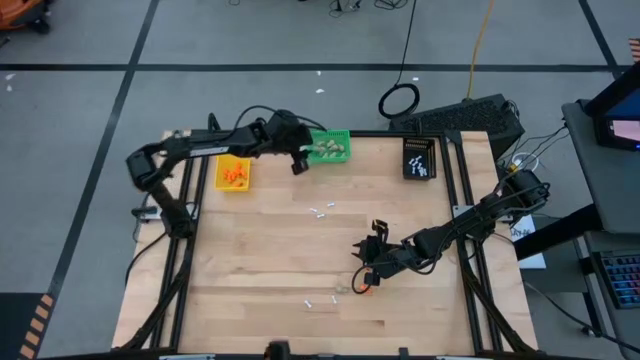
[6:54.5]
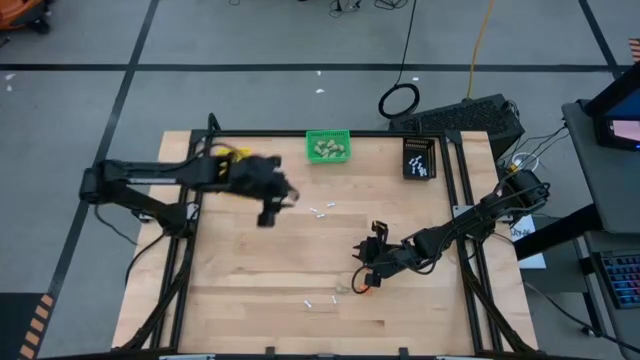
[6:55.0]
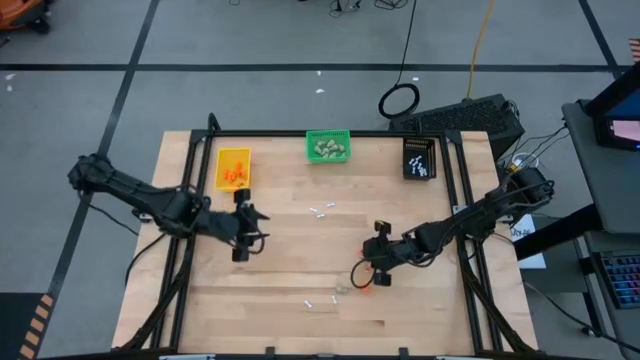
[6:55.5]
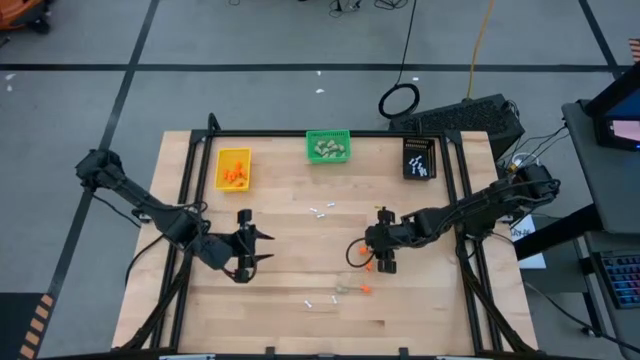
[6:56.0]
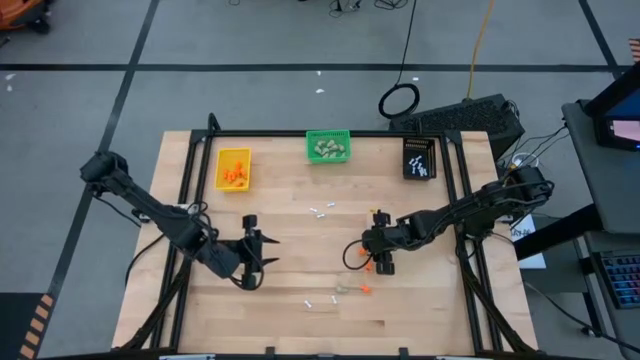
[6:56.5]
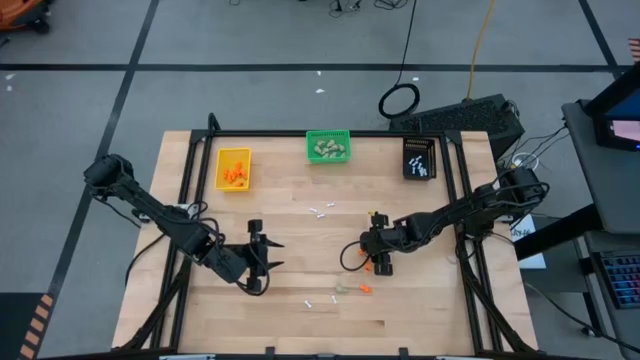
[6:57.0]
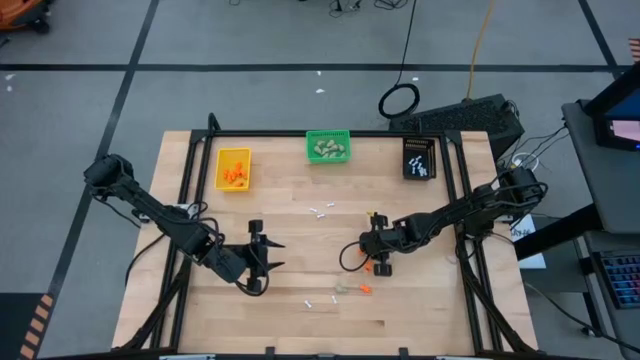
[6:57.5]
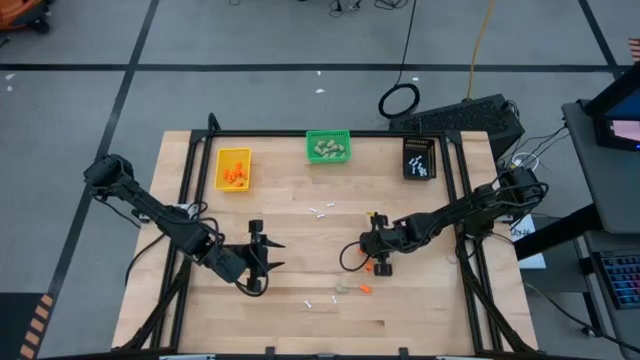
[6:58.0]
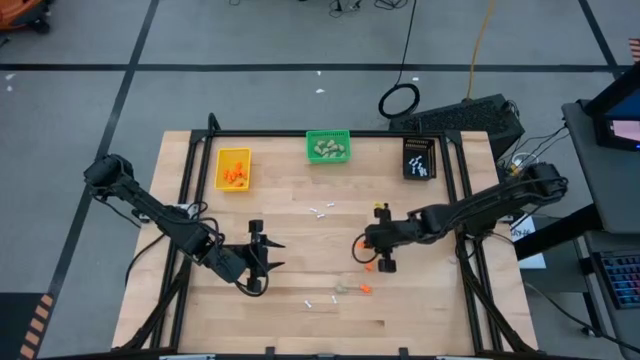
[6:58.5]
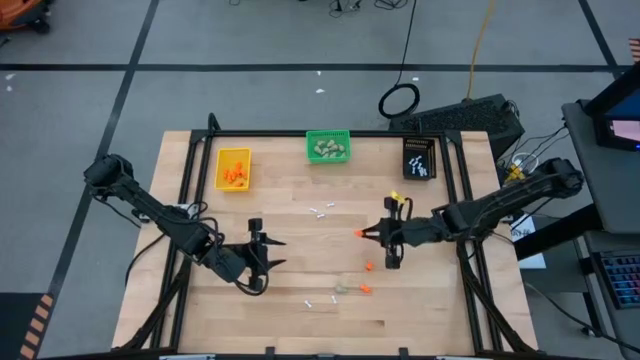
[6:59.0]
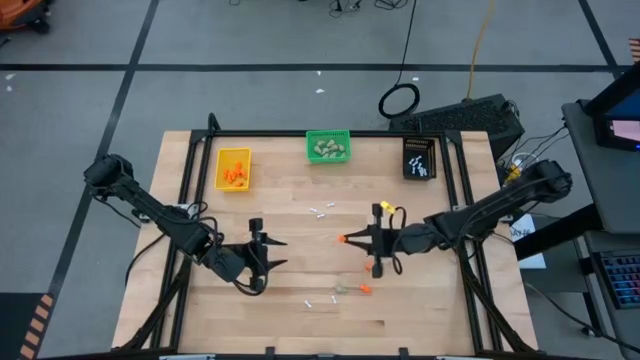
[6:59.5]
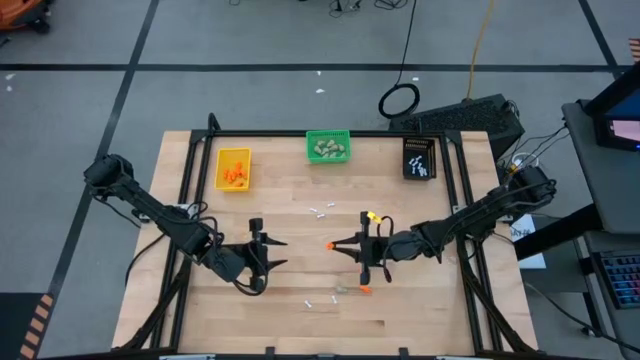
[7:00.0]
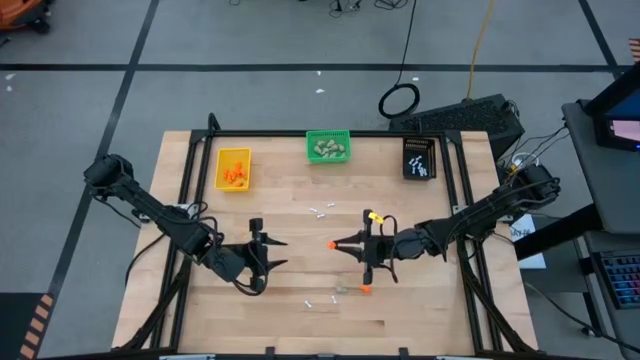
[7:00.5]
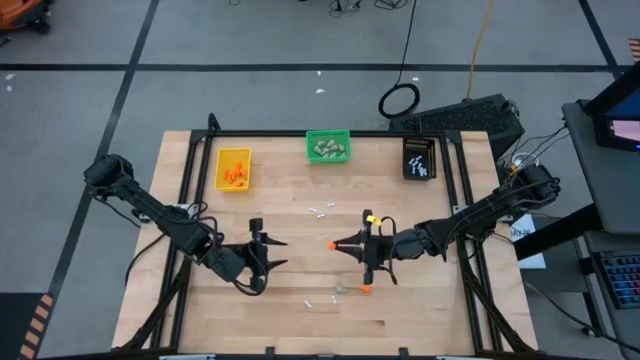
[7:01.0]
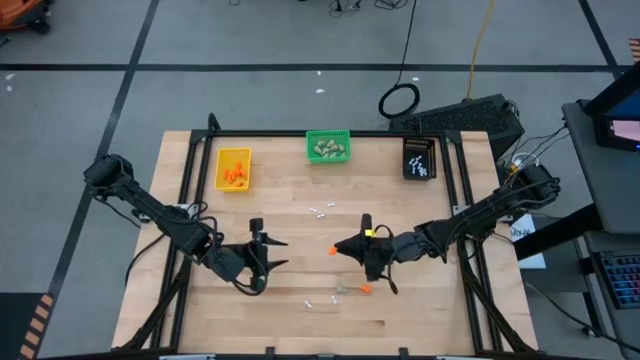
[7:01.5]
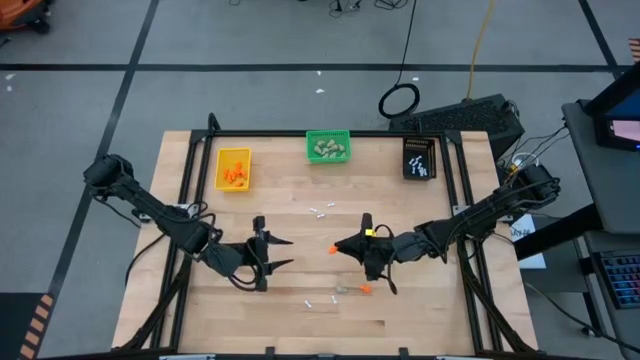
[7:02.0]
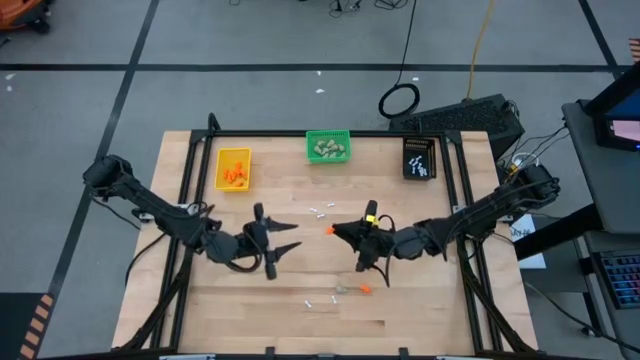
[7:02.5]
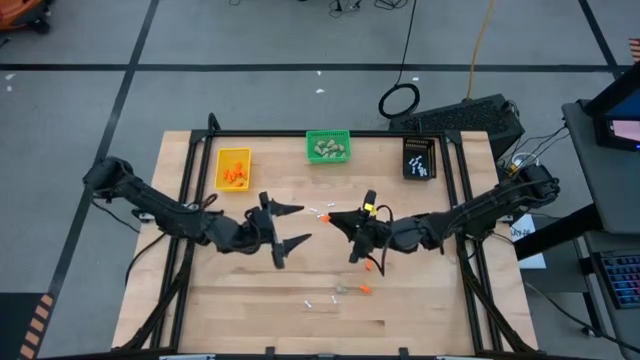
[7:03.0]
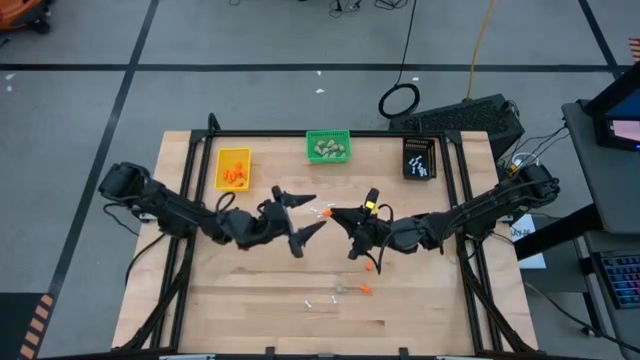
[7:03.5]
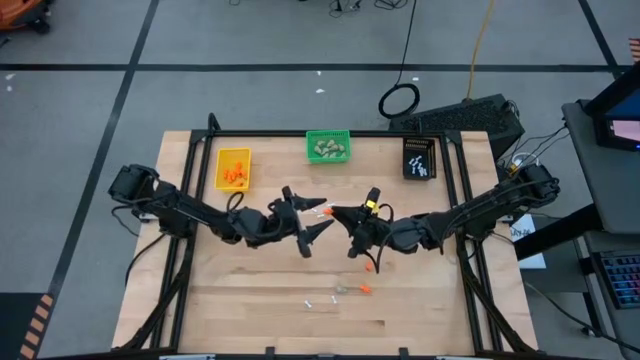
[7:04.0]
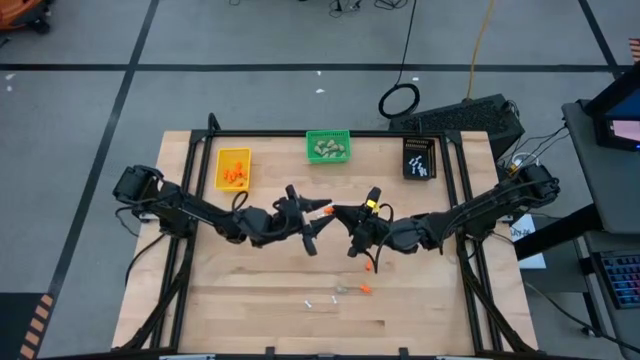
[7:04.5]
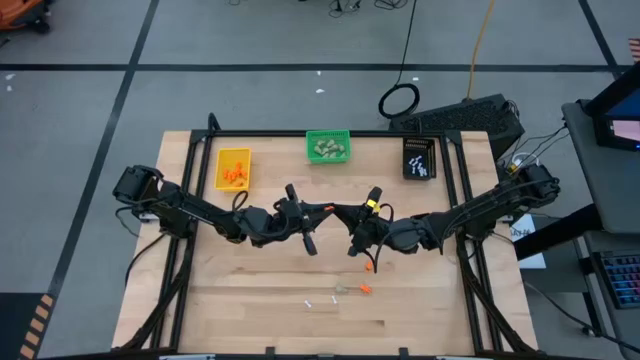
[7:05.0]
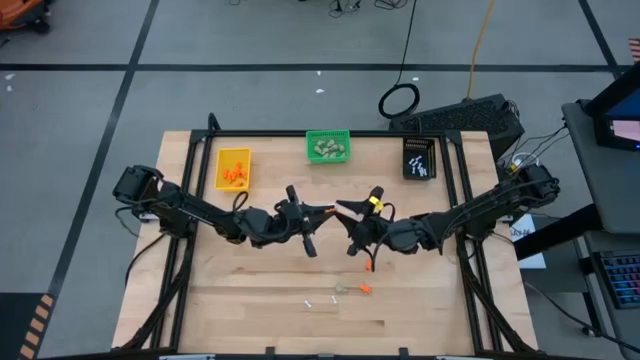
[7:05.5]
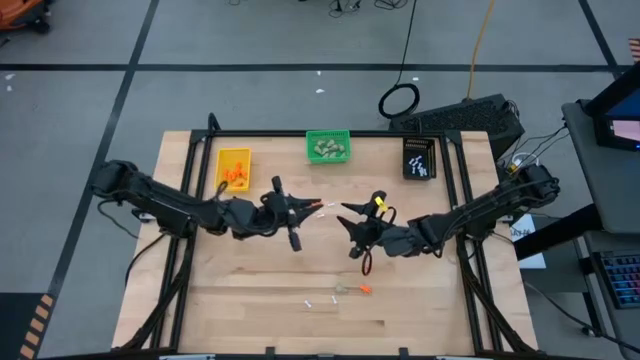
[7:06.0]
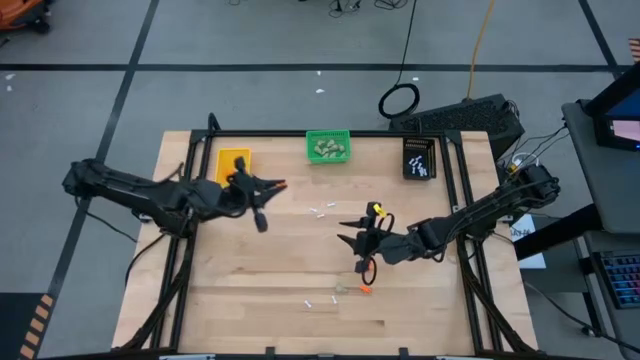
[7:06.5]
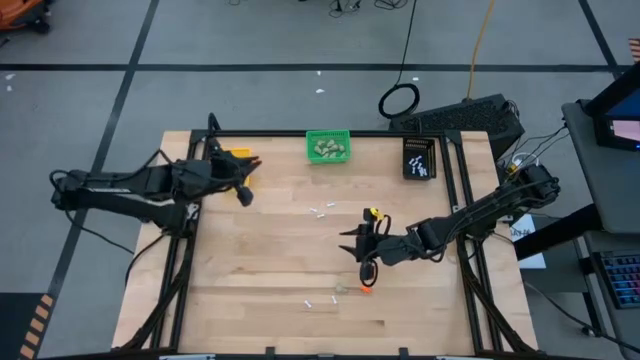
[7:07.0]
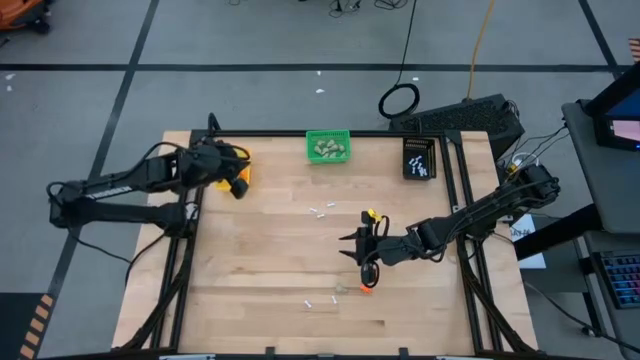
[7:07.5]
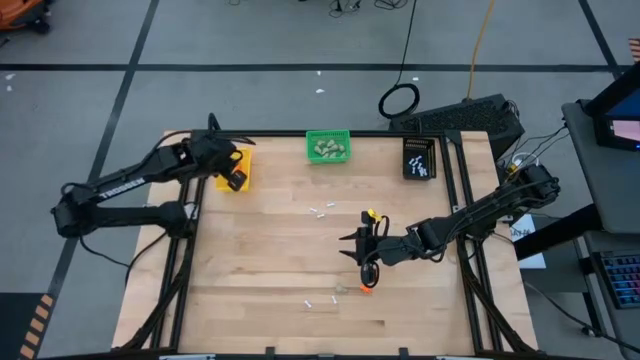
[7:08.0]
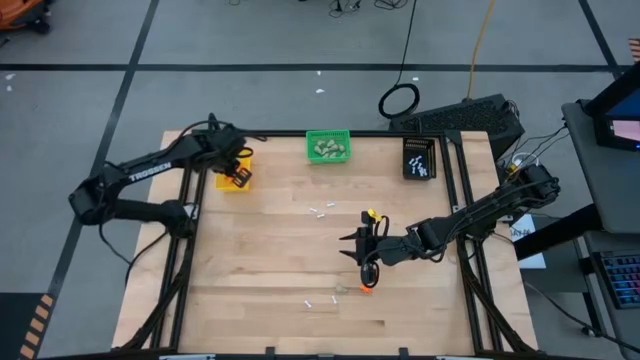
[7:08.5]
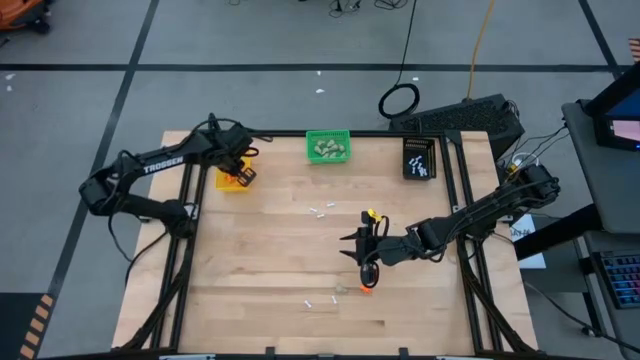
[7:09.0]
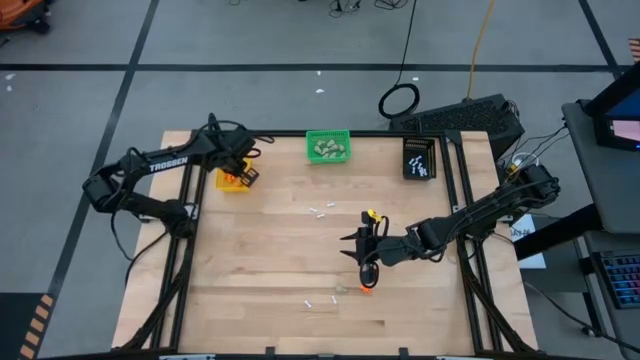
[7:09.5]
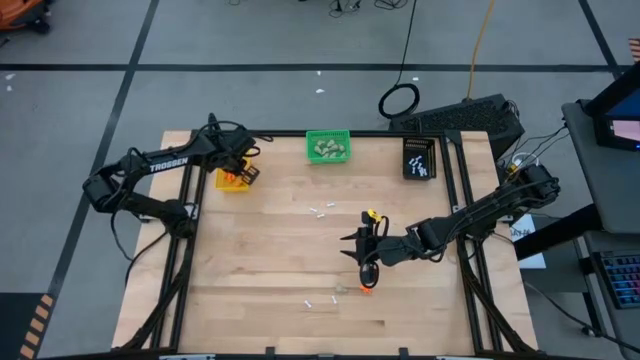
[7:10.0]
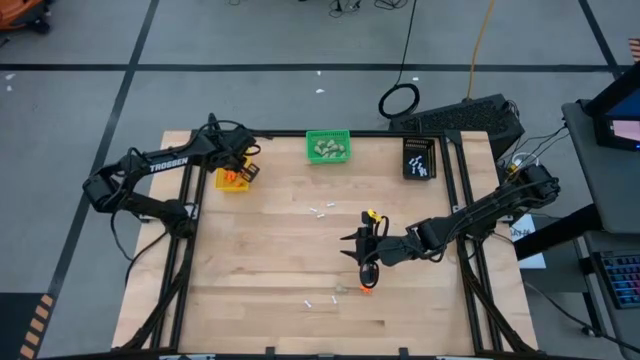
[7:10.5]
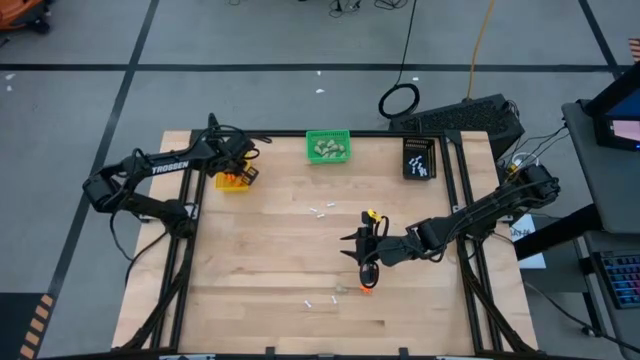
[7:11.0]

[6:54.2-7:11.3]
Task: Sort Halloween decoration
Put the skeleton toy into the yellow bin

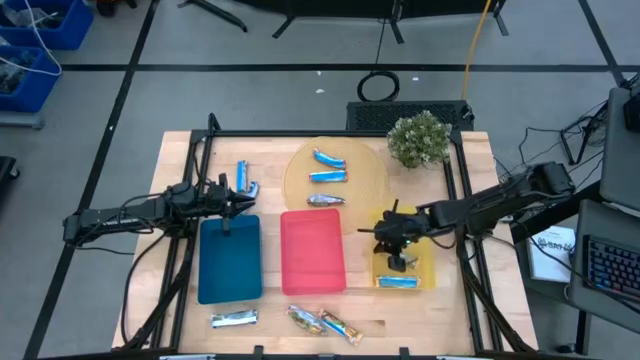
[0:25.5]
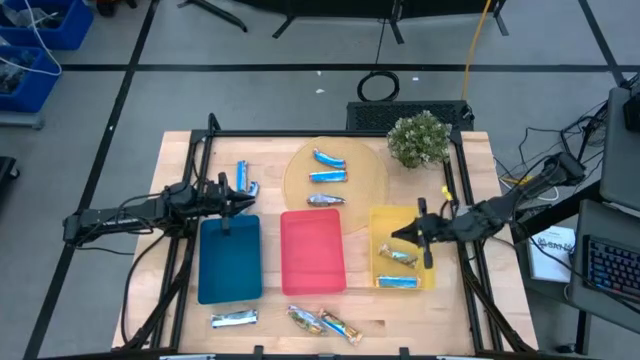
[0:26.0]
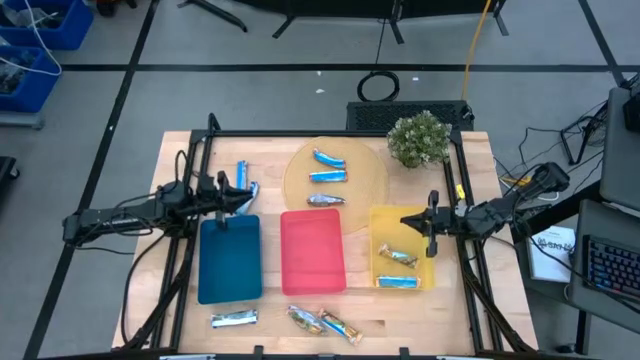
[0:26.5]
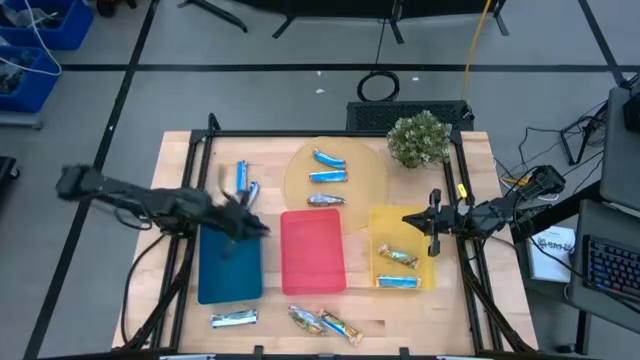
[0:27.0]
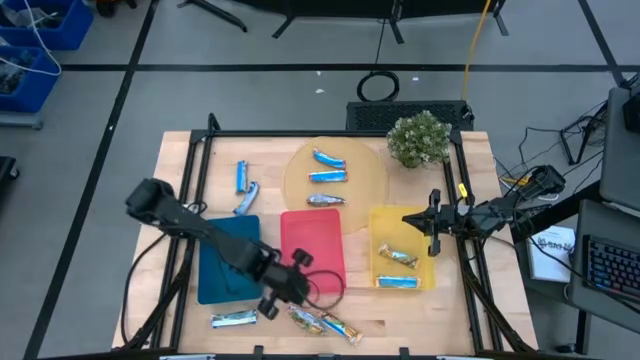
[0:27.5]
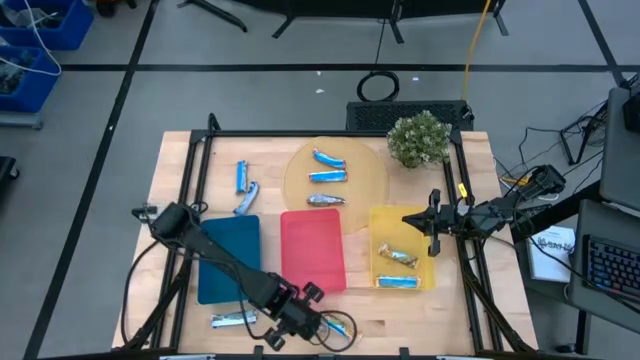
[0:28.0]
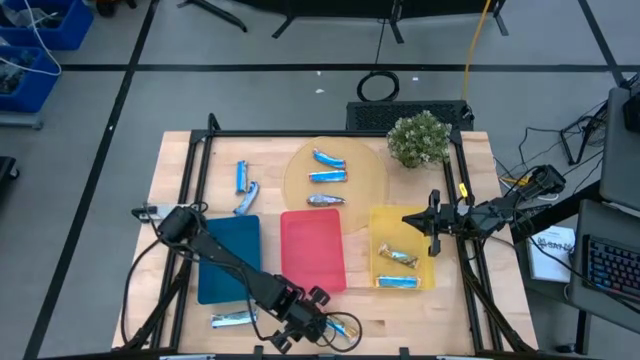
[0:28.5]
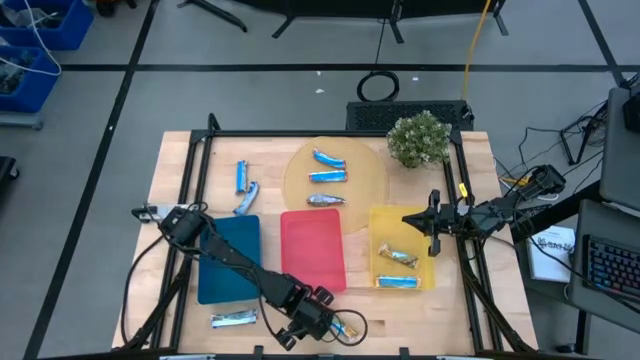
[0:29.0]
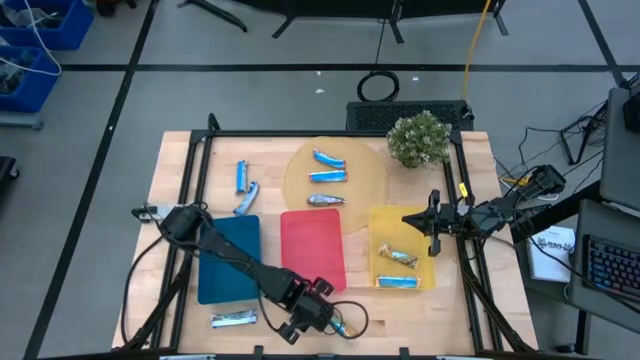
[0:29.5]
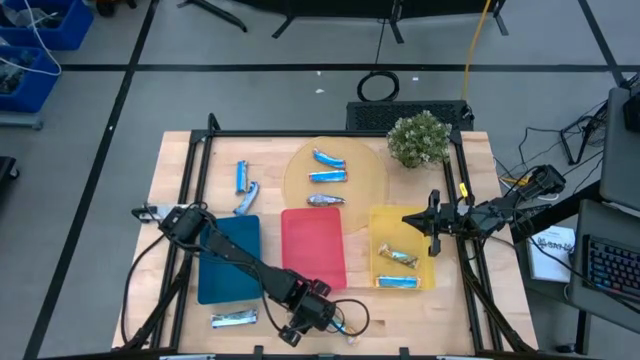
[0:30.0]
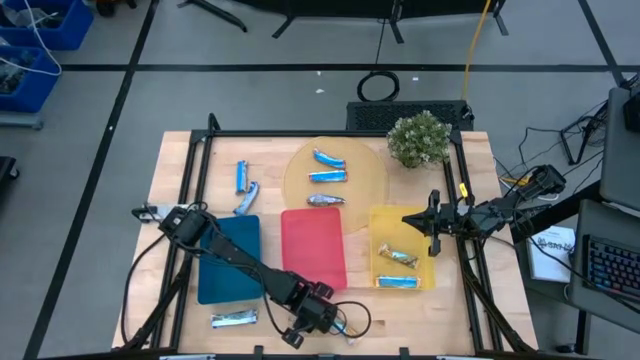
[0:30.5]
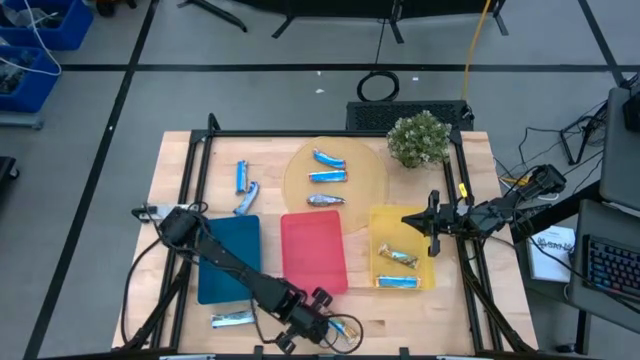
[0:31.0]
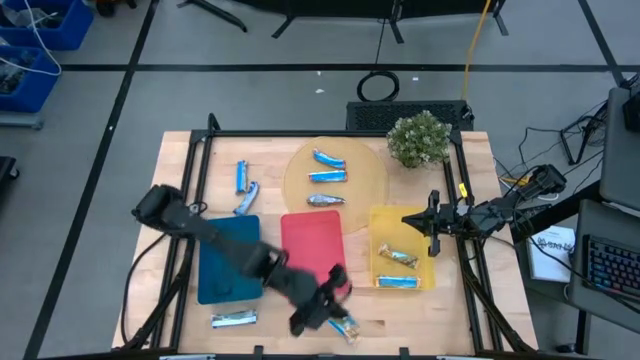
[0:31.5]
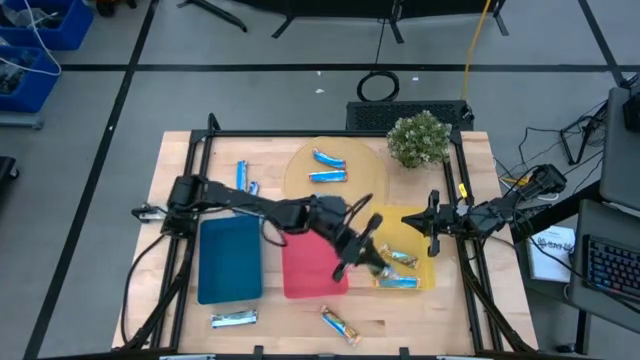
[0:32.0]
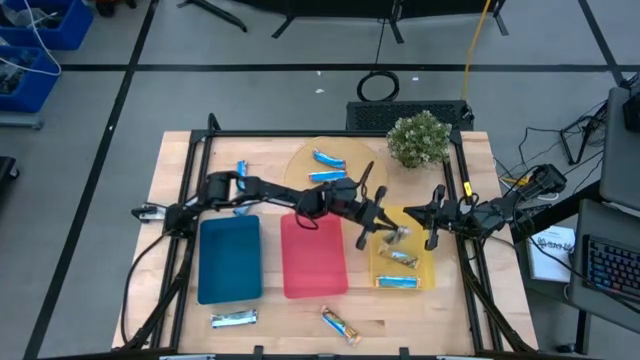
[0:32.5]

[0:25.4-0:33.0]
Task: Pick and place Granola Bars by type
Put the left yellow granola bar into the yellow bin
